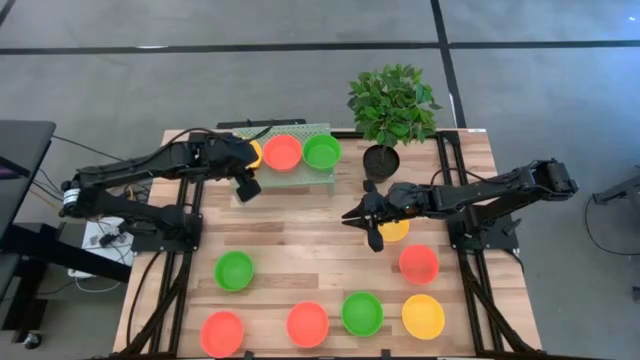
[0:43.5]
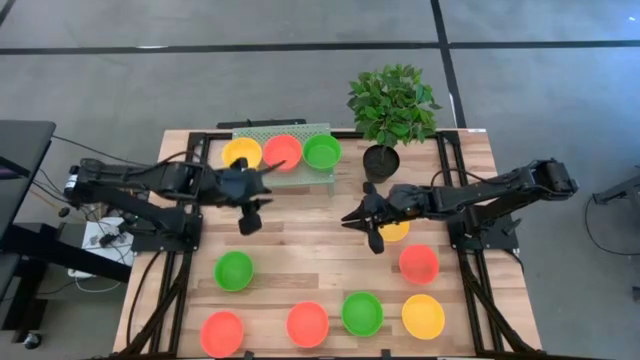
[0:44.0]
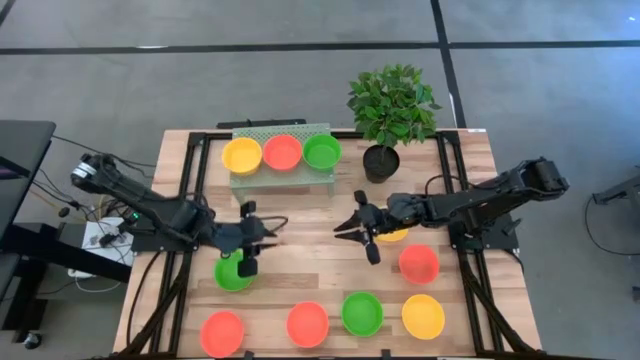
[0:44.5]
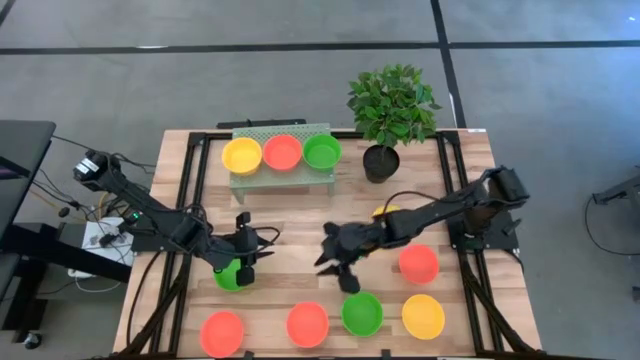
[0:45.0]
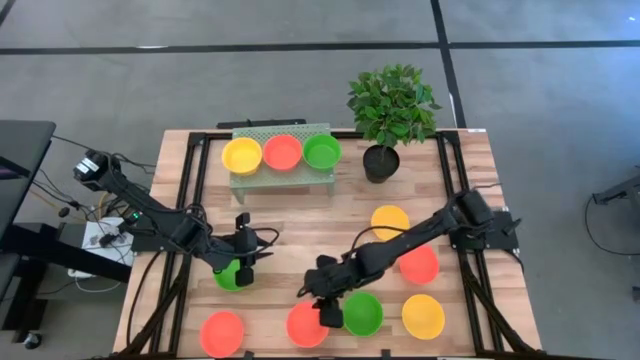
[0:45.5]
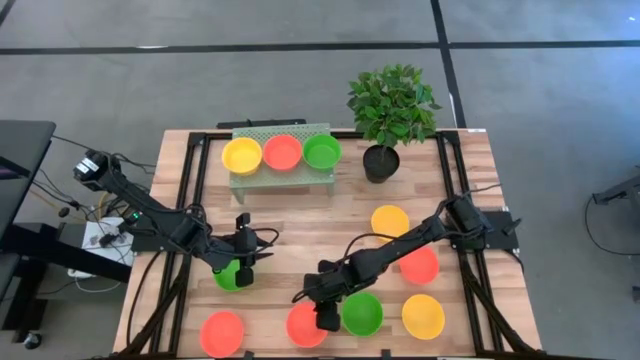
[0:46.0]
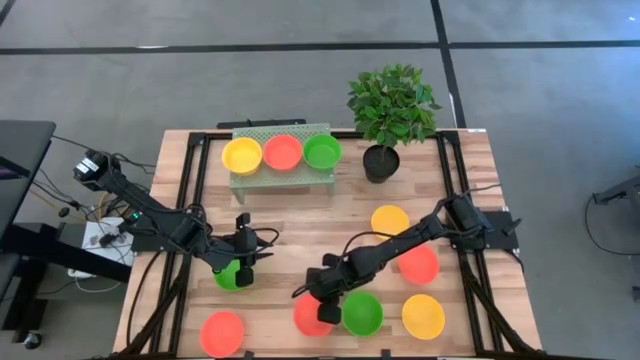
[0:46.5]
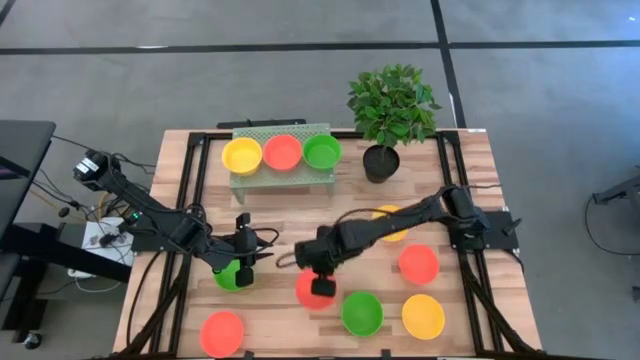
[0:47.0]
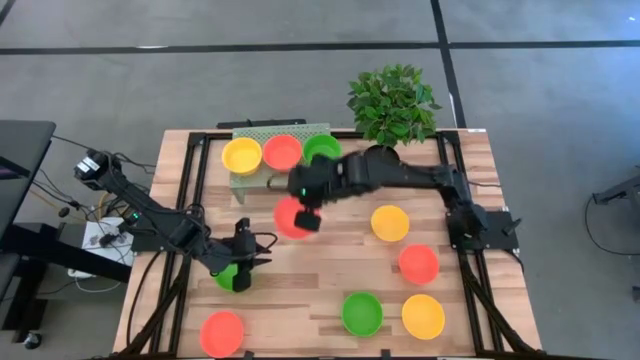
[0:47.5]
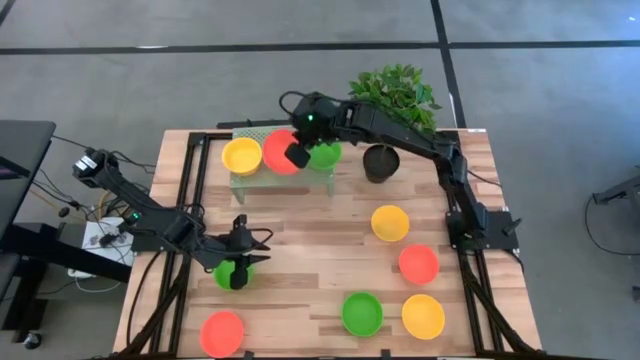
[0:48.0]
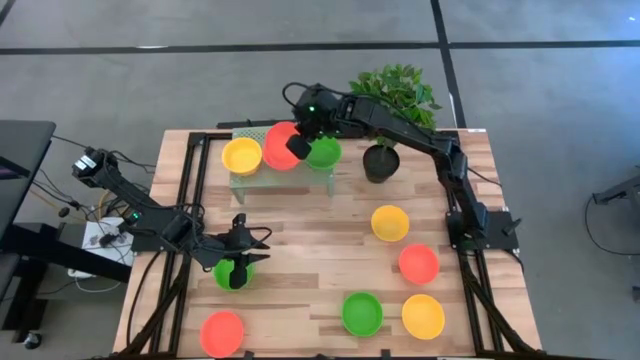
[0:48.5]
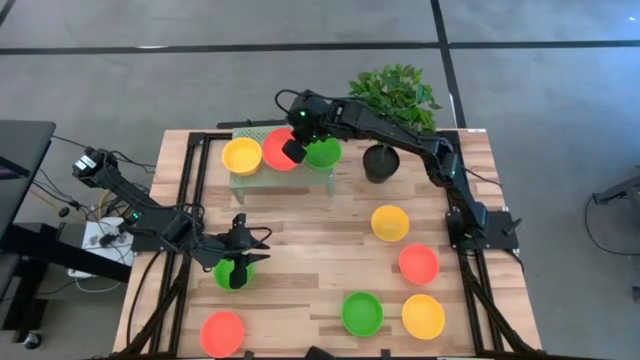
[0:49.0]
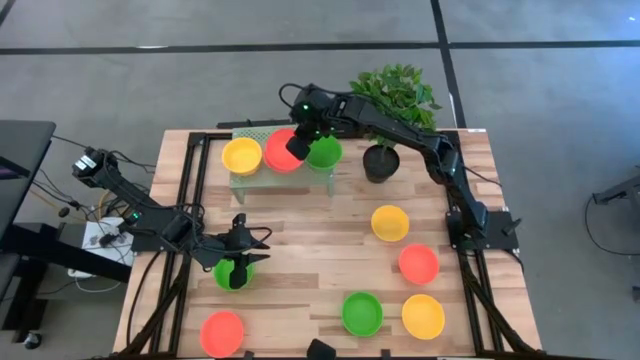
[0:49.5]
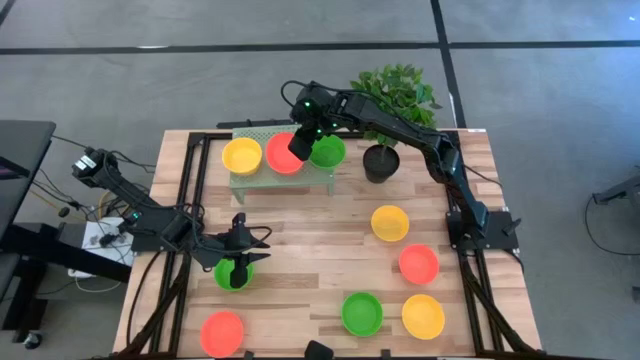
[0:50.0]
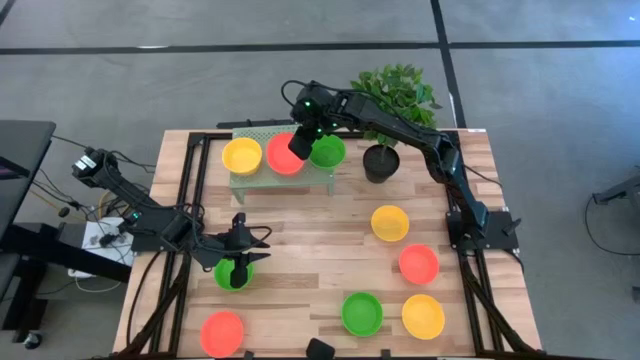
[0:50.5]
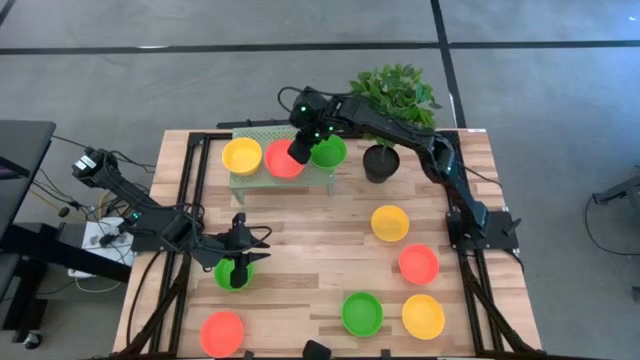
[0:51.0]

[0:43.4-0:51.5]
Task: Pick & Place Mini bowls
Stack the orange bowl on top of the orange bowl on the shelf

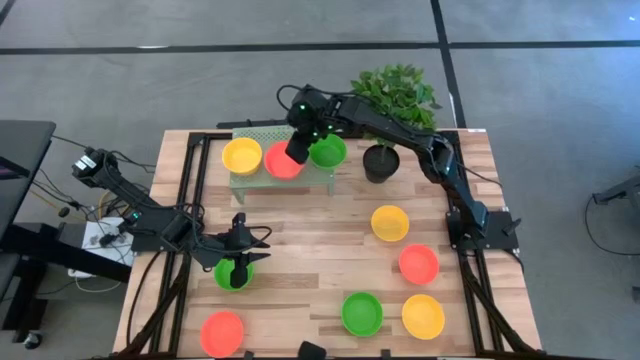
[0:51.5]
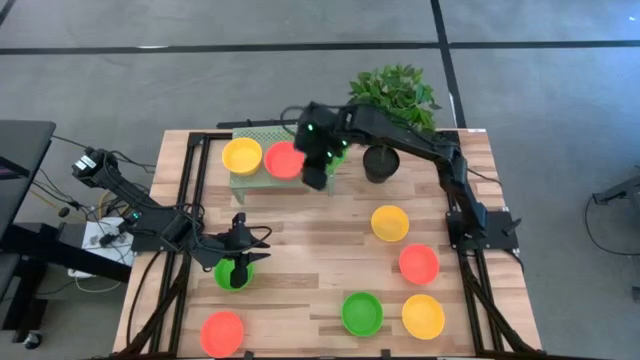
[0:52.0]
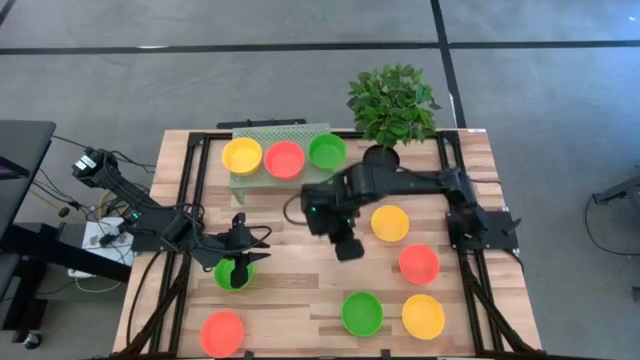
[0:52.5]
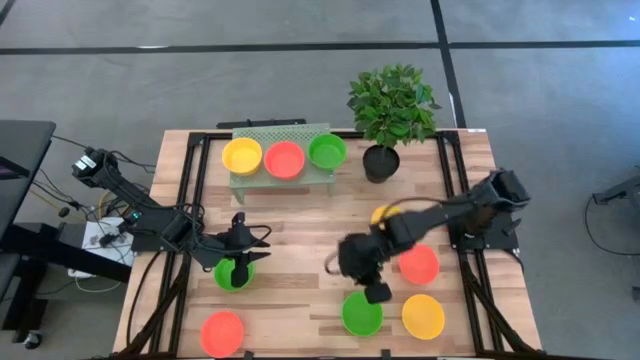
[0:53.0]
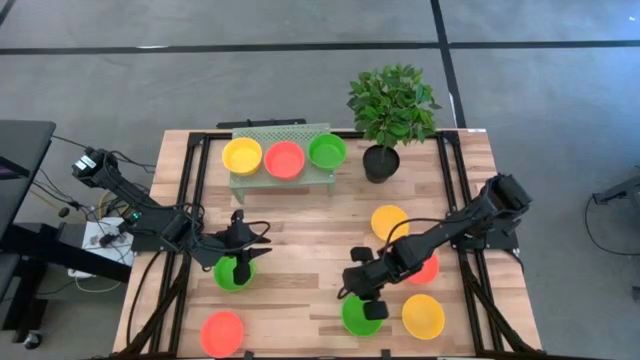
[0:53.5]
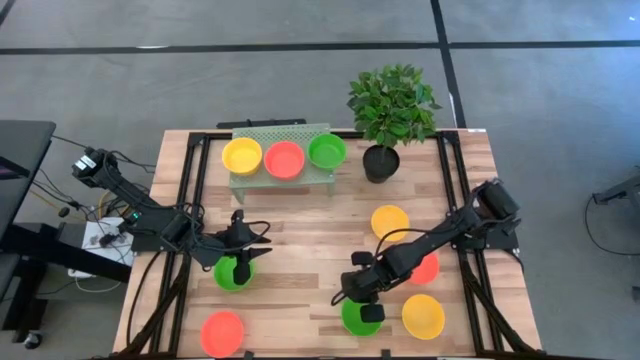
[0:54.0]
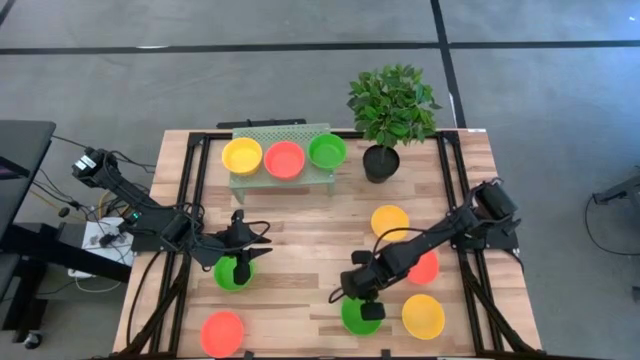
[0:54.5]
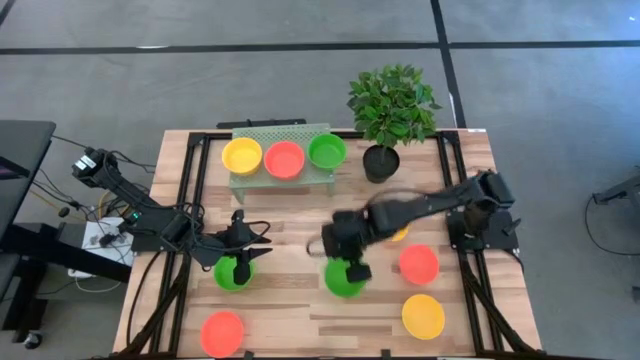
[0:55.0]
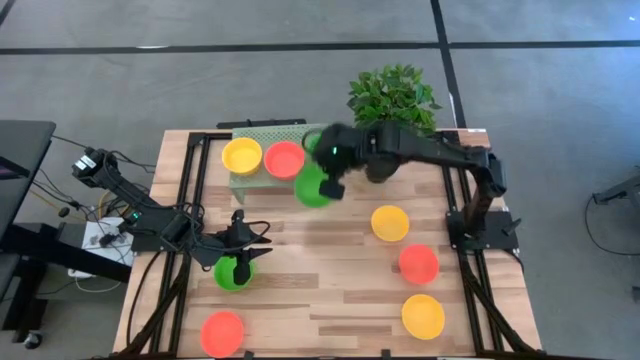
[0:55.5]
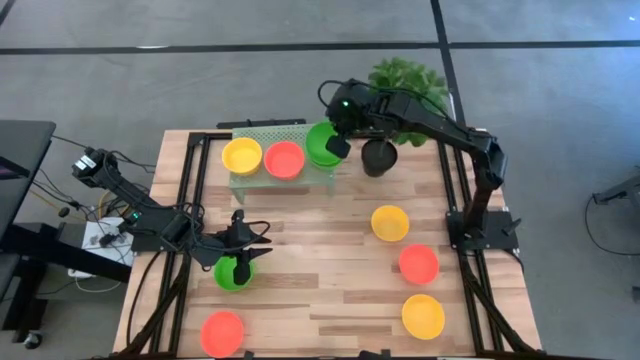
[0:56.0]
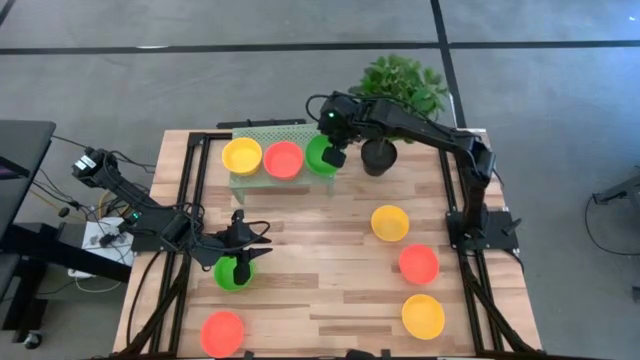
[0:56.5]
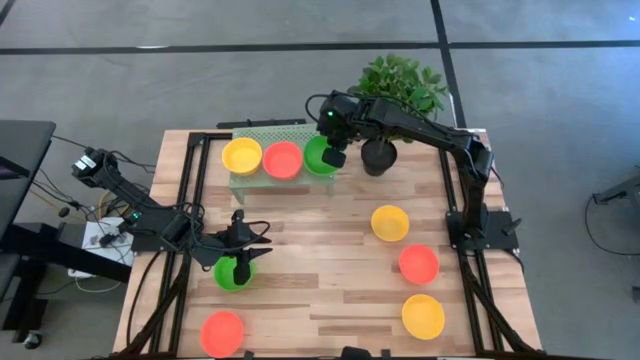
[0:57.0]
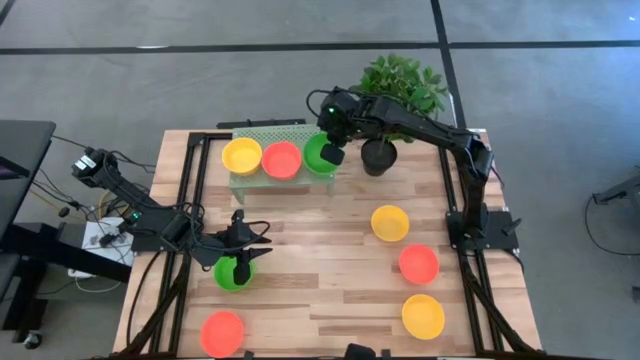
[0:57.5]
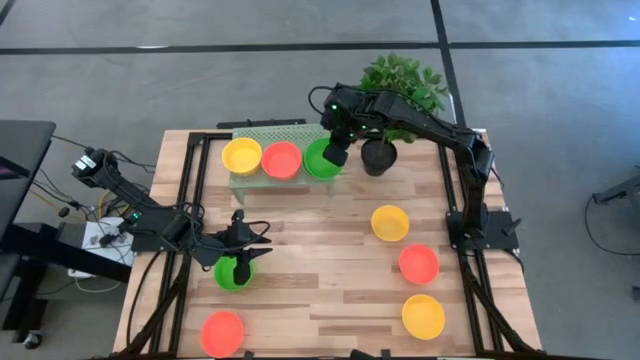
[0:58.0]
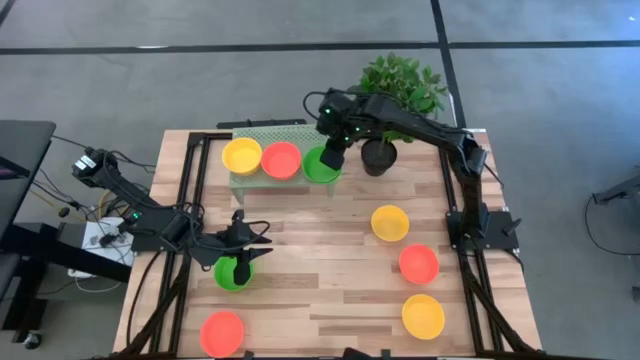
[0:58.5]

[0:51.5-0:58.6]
Stack the green bowl on top of the green bowl on the shelf

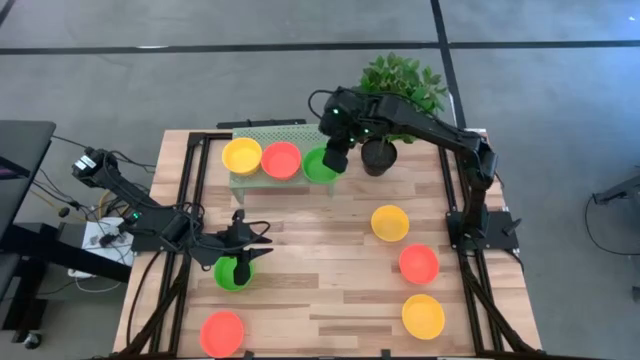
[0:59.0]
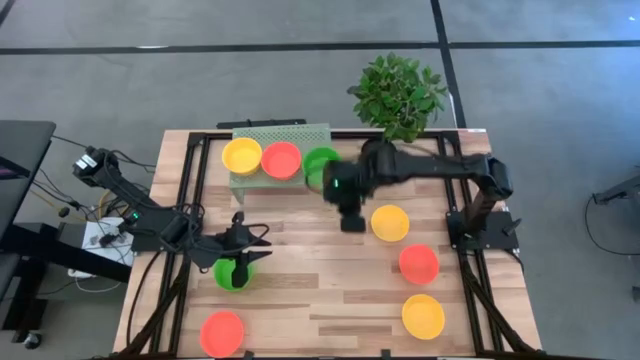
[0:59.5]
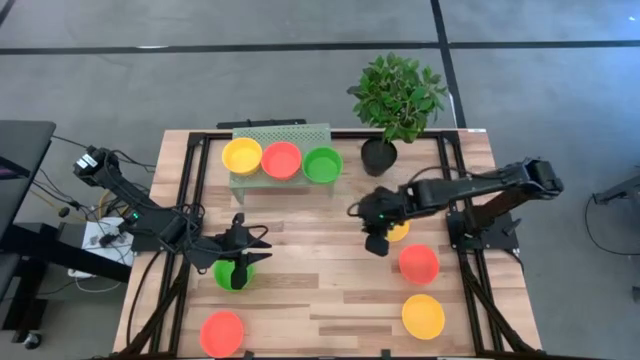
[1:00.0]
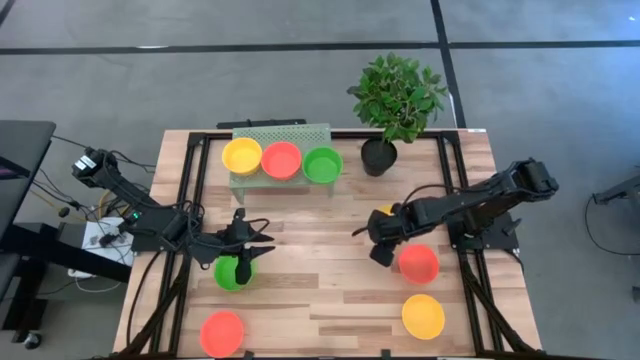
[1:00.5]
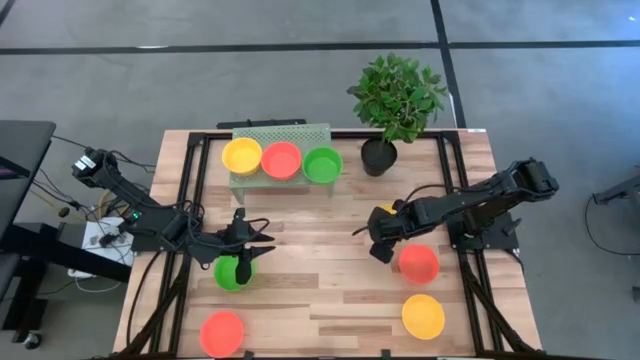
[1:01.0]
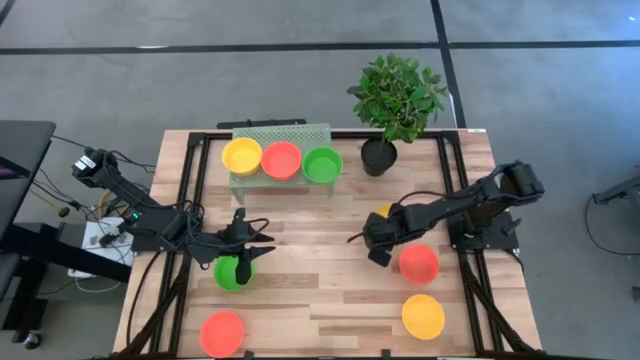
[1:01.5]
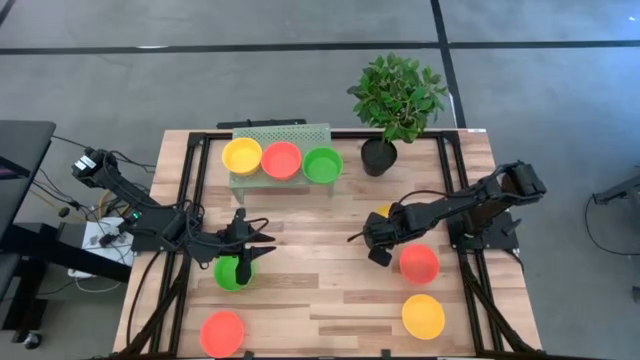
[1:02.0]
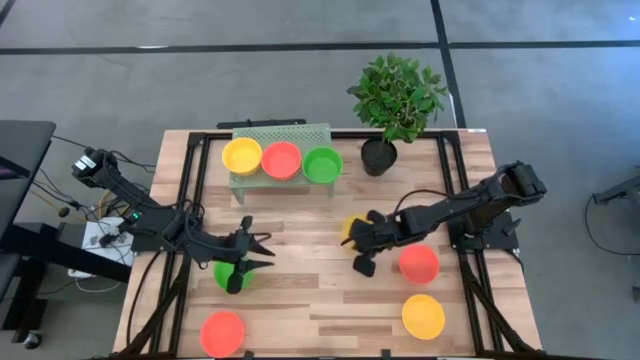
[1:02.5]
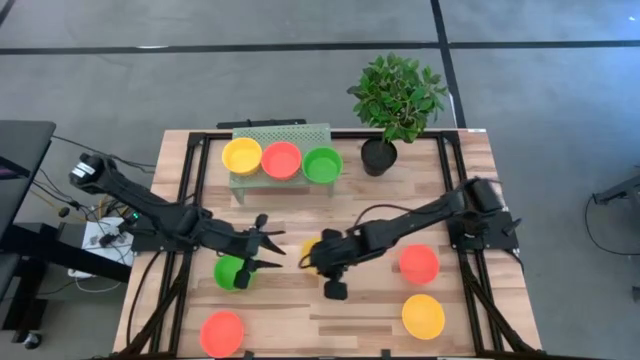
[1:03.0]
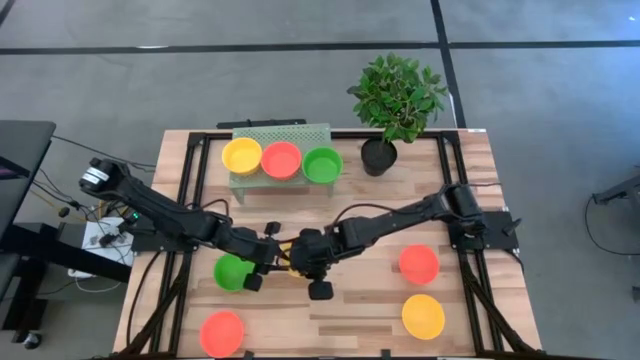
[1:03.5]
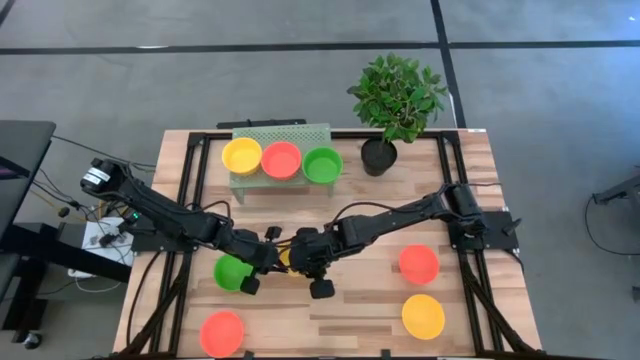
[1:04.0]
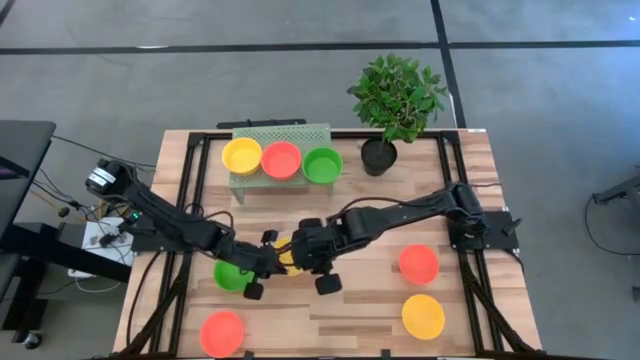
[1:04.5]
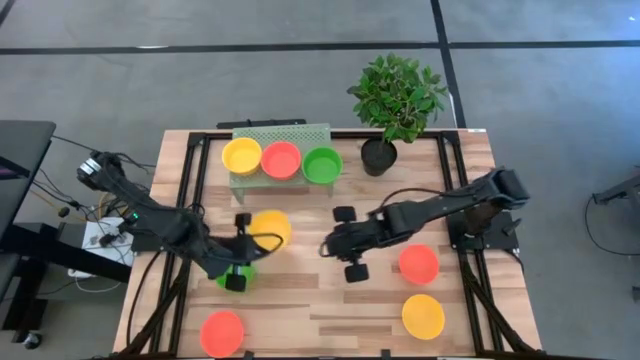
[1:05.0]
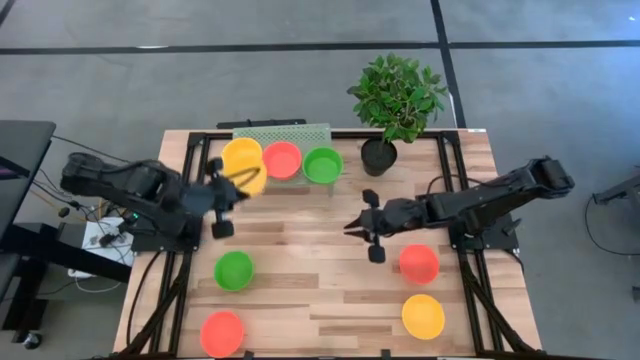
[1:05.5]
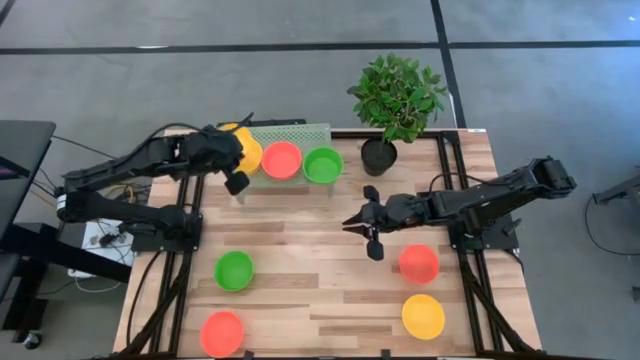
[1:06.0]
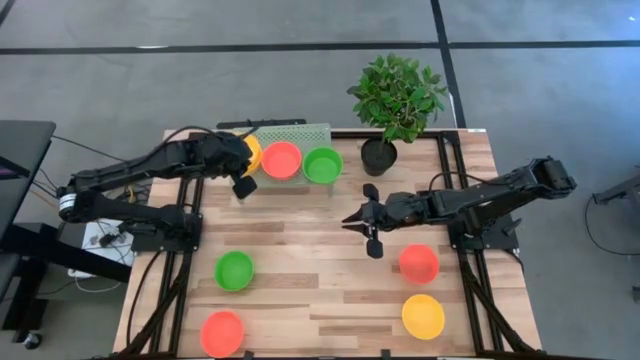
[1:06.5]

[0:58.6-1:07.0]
Stack the yellow bowl on top of the yellow bowl on the shelf
